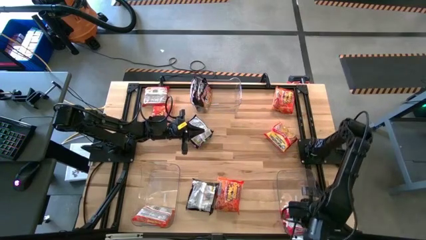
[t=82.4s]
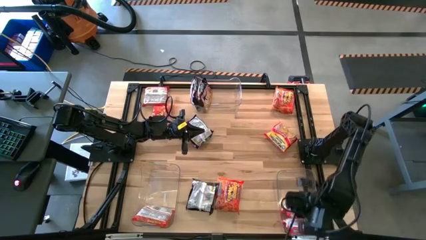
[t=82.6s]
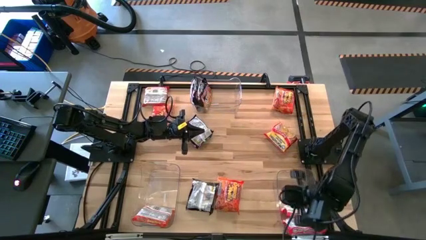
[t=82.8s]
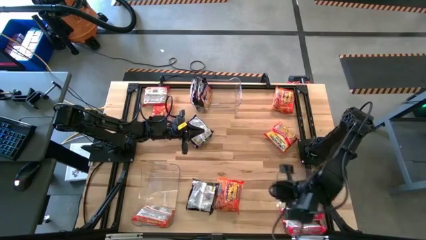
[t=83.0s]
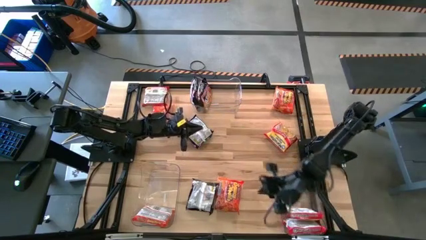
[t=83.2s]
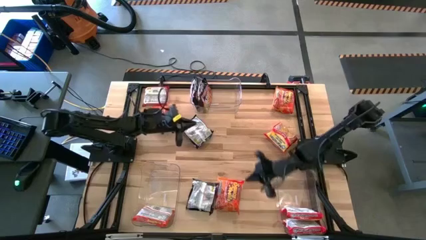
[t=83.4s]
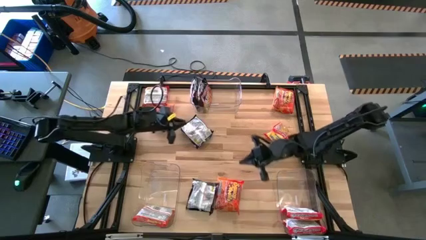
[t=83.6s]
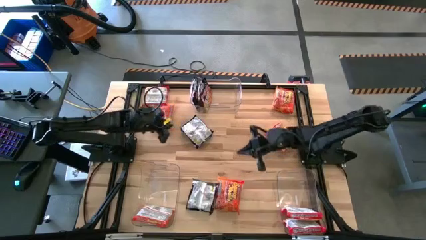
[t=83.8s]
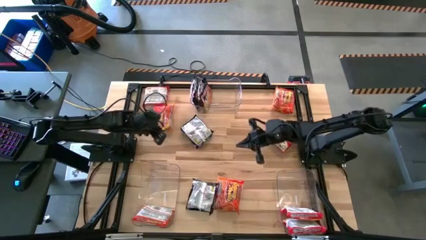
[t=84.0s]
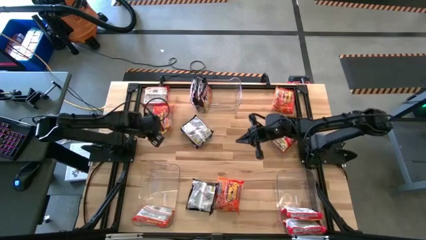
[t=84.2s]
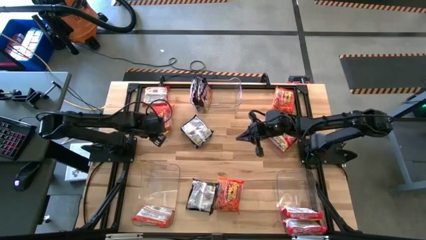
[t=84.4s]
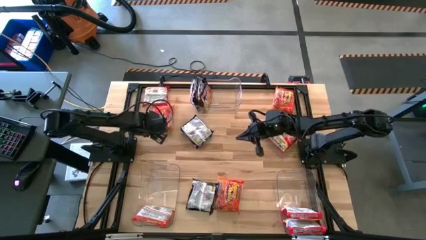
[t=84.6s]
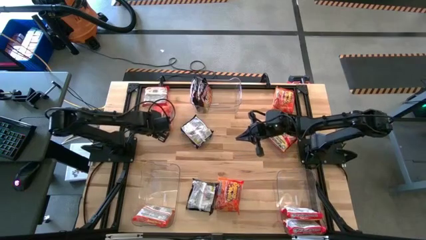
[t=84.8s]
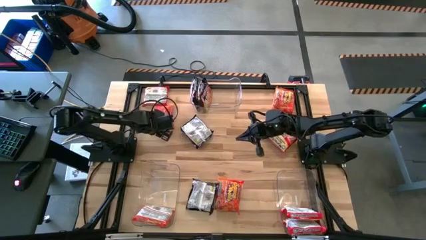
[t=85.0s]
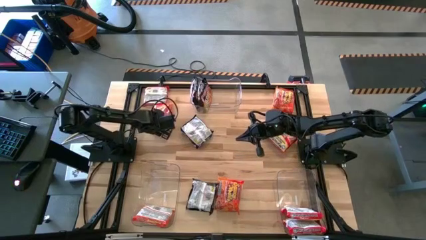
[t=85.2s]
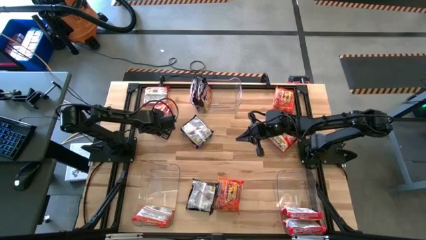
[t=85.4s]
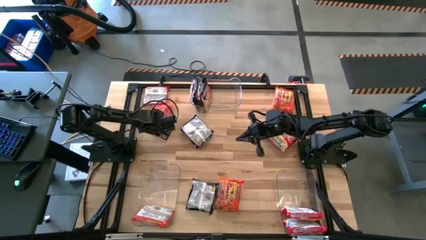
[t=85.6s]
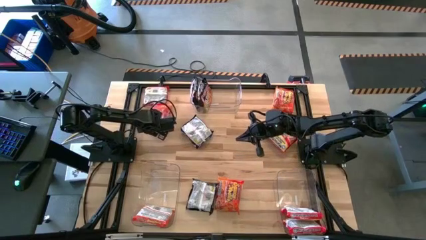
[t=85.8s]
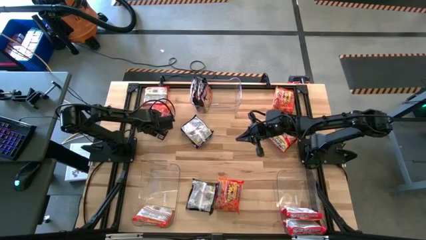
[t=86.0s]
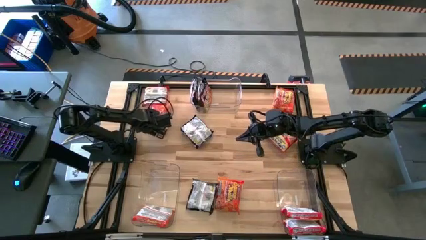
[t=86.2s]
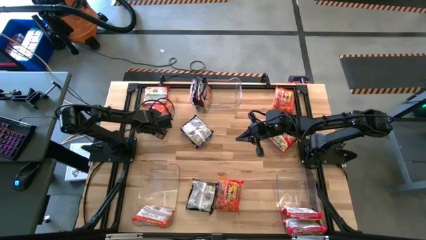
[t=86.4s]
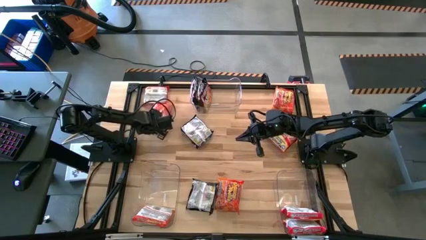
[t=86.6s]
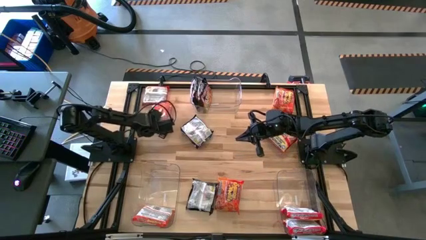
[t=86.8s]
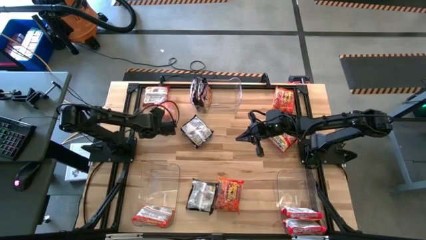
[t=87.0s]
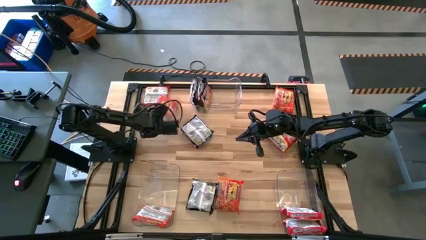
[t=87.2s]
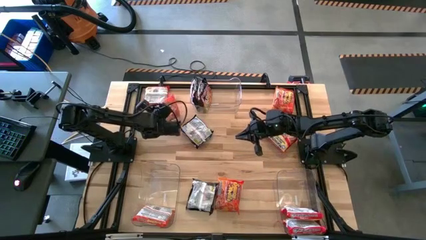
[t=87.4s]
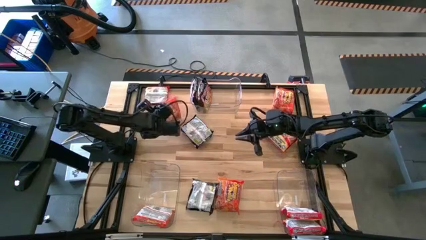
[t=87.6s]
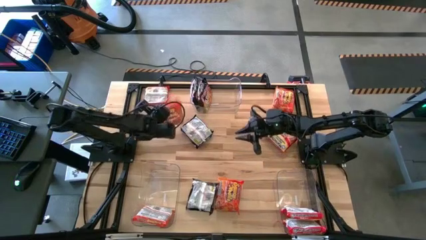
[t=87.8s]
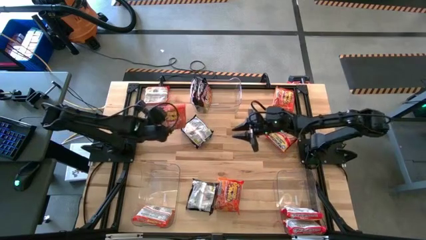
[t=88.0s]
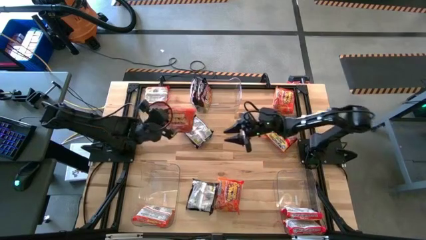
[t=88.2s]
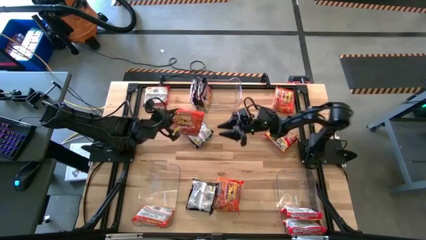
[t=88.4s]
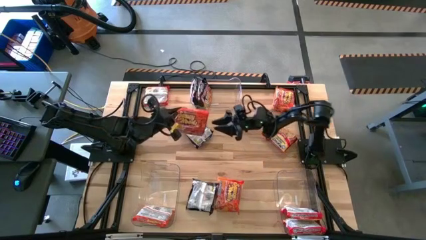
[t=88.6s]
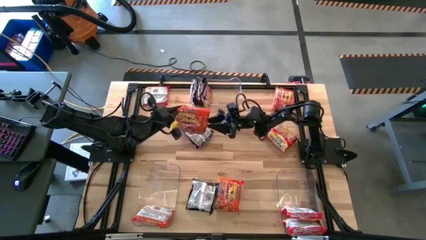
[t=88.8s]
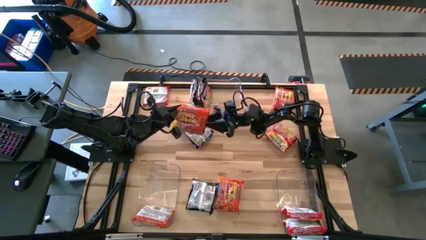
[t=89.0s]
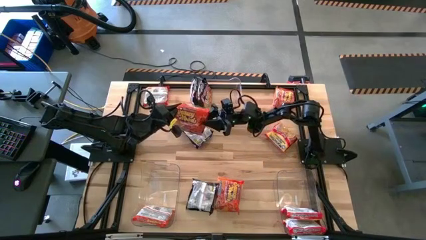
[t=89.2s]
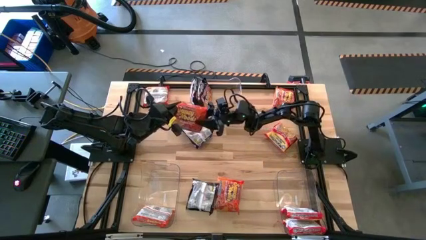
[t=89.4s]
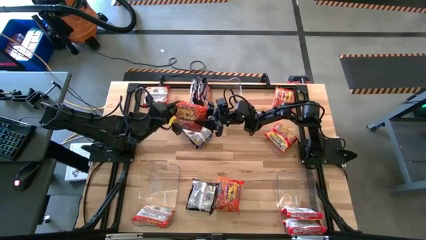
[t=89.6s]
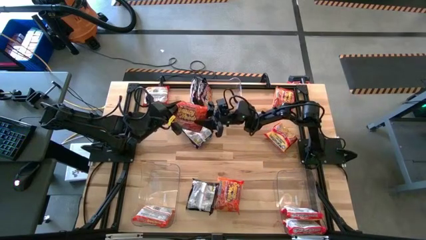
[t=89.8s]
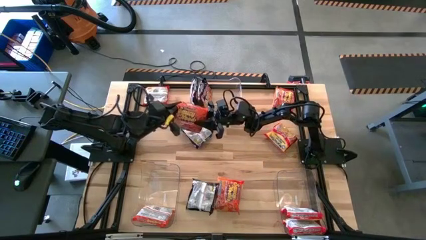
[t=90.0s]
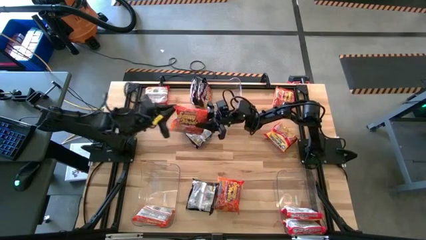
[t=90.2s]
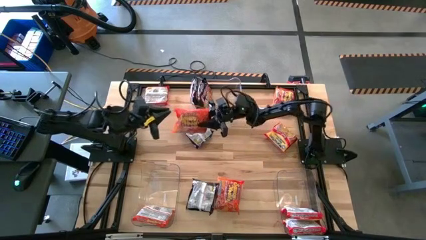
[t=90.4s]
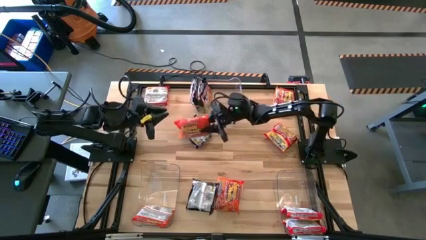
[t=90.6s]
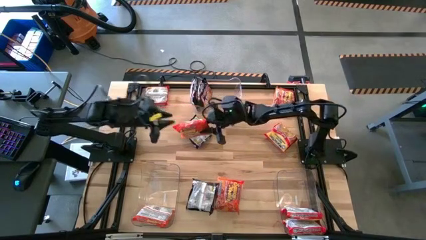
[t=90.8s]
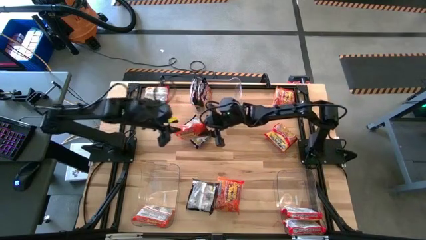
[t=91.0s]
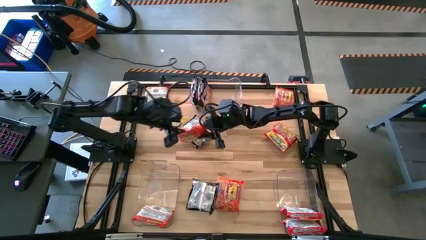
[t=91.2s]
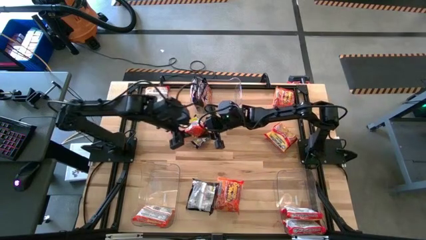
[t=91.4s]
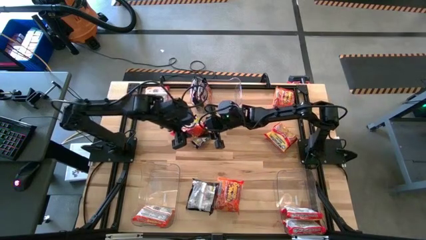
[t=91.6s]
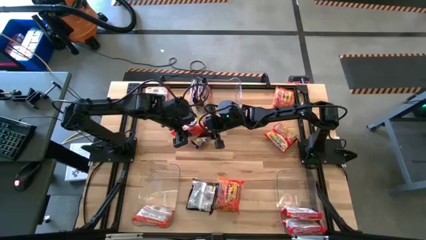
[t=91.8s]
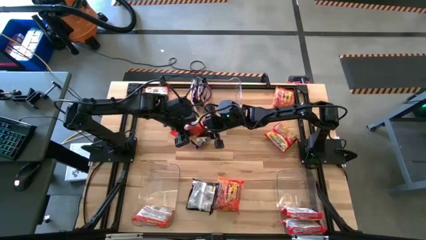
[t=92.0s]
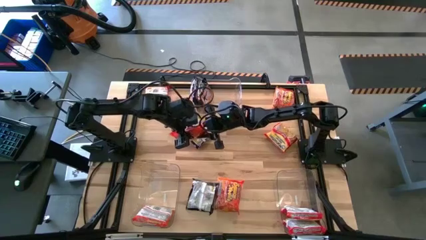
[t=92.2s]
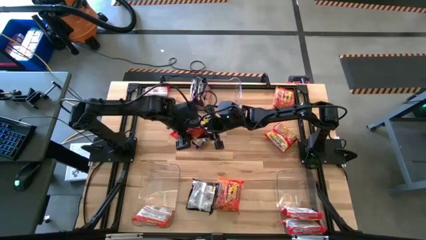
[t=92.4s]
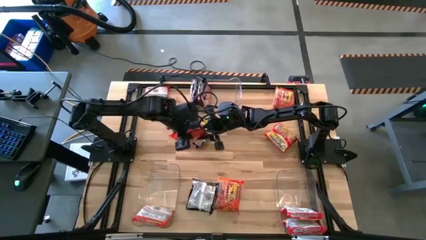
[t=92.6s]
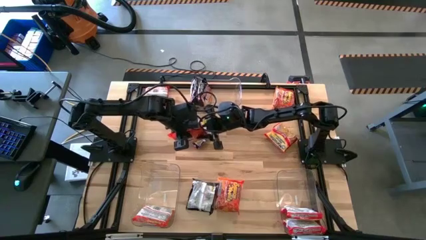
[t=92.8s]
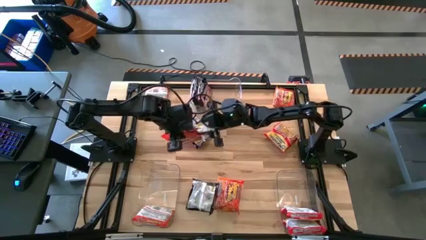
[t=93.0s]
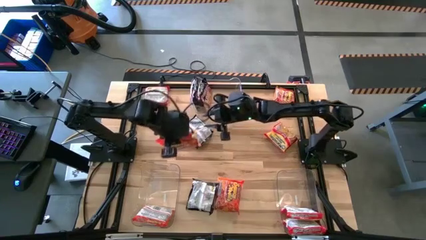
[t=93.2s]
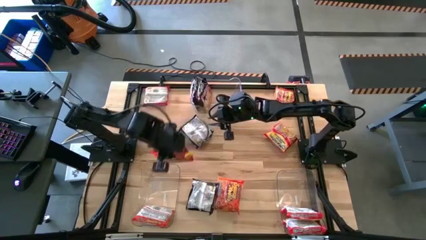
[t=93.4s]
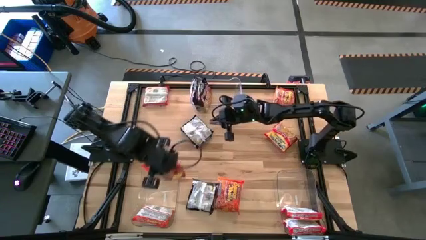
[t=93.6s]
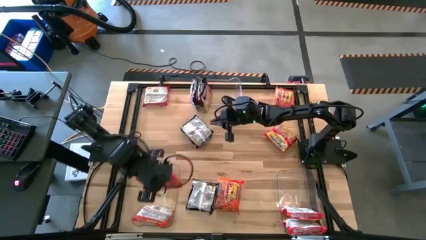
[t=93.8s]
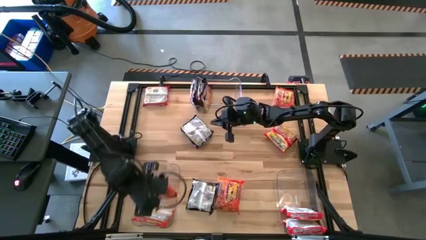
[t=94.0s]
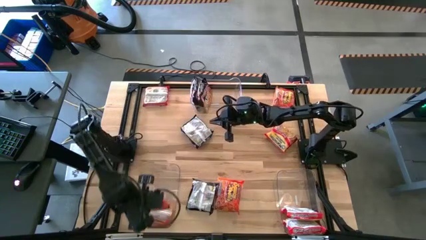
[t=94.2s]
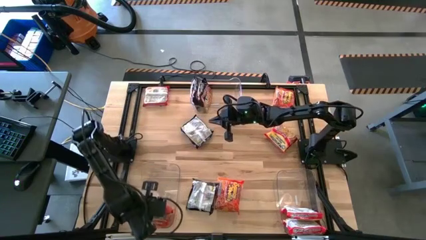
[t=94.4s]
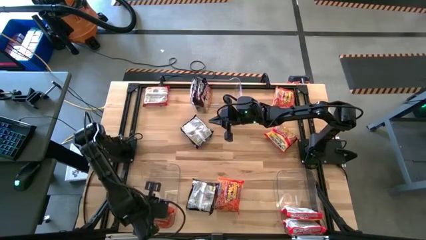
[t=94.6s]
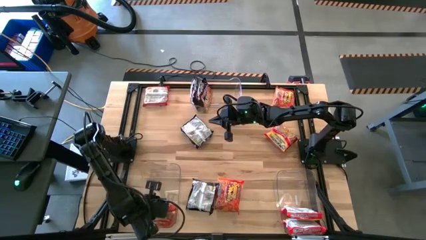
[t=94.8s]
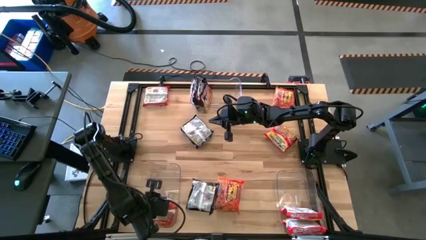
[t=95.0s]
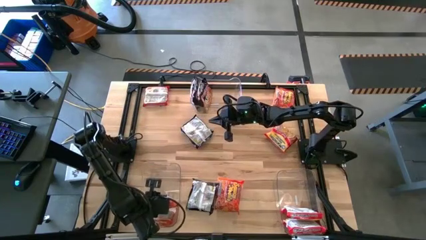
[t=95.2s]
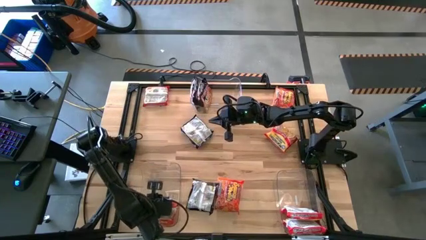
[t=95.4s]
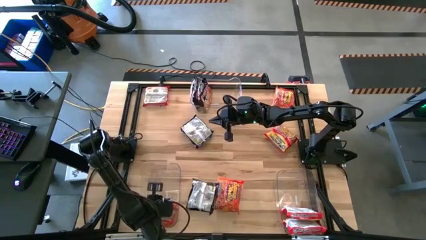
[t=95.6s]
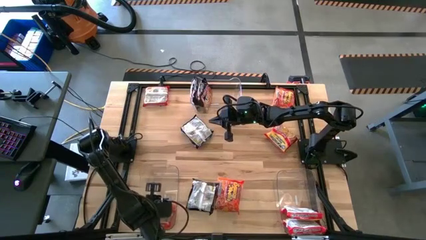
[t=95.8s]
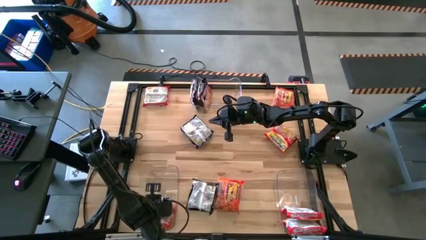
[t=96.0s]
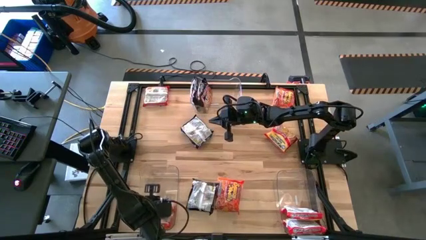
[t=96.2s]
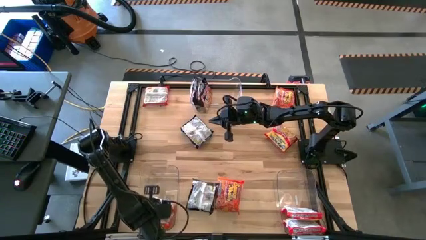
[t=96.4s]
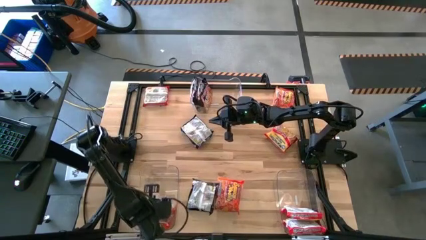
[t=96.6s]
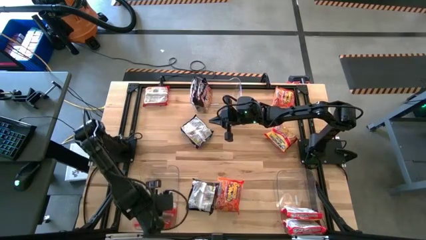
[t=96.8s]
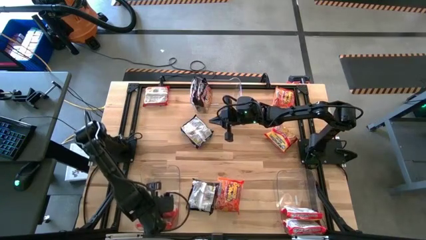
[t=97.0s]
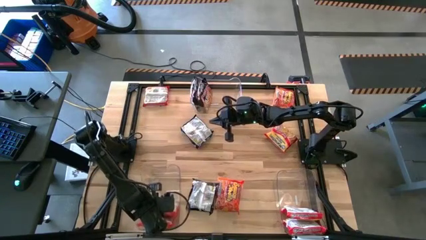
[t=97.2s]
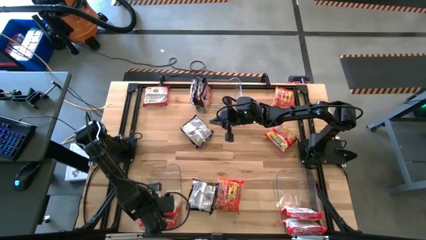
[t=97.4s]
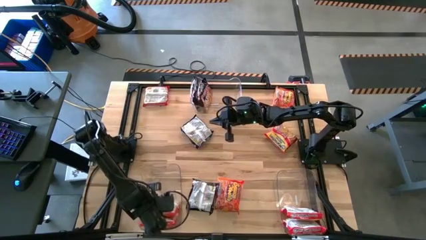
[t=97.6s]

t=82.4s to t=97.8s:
Task: Sort Maruchan noodles
Put the top left orange noodle pack into the bottom left transparent bin

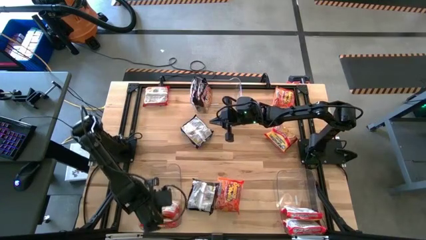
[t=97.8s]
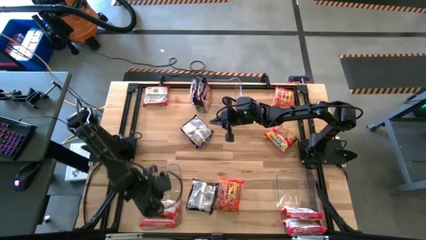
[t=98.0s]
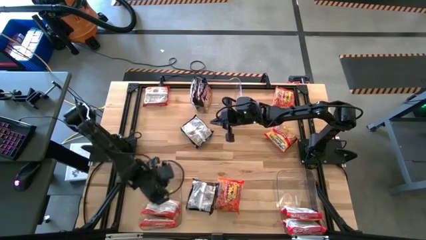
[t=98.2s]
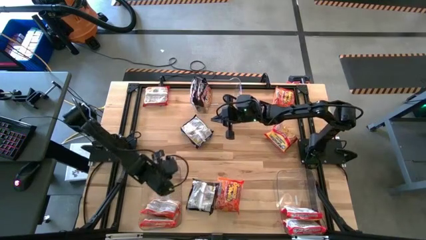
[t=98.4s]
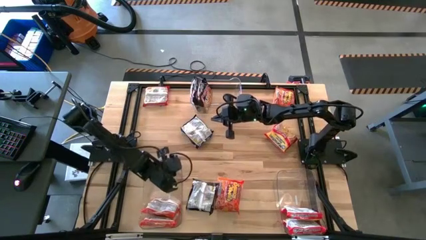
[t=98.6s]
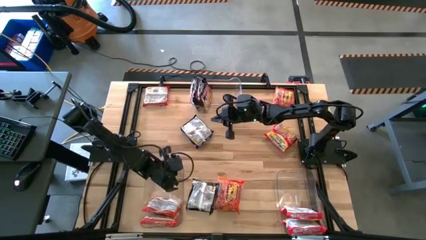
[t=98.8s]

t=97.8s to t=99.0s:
Adjust the bottom left transparent bin
